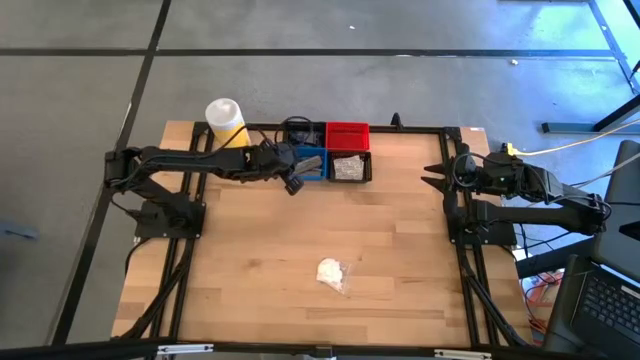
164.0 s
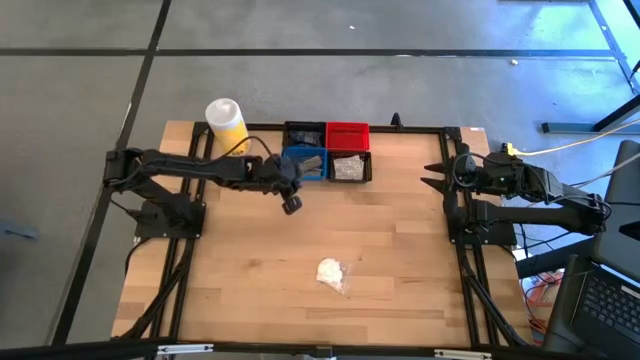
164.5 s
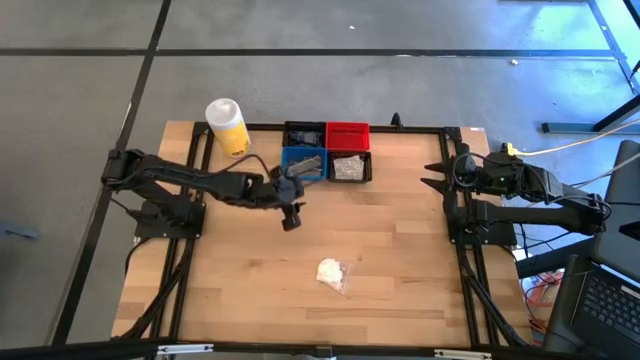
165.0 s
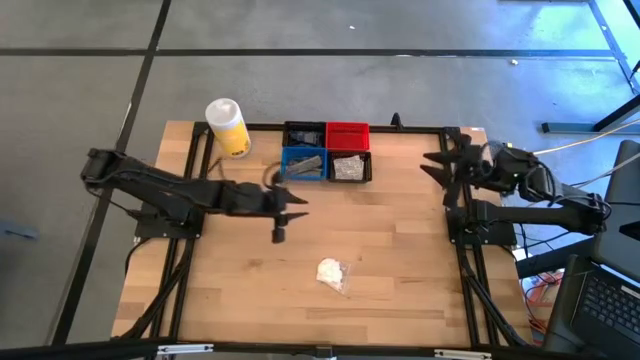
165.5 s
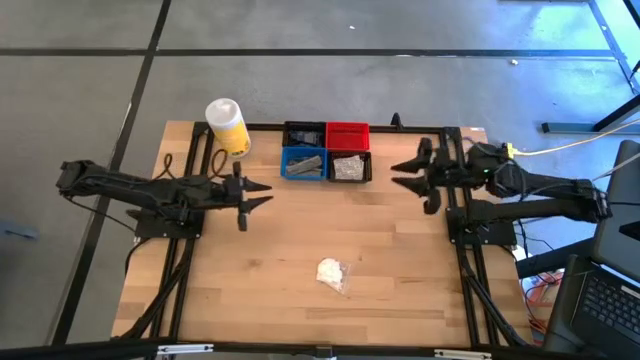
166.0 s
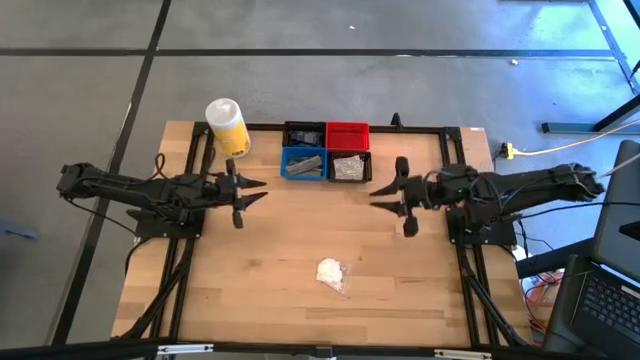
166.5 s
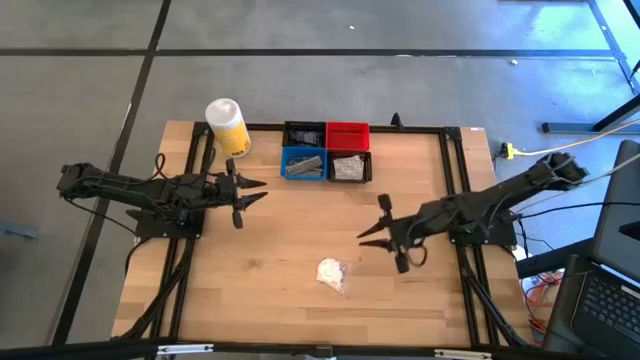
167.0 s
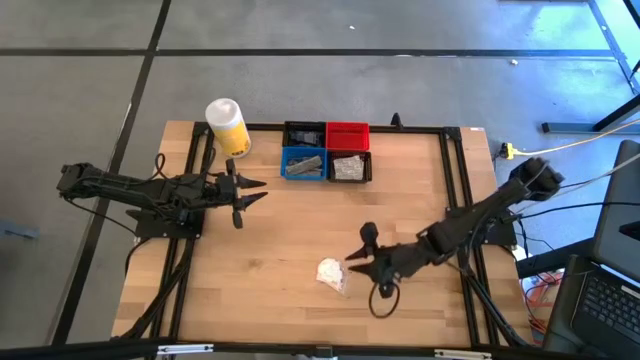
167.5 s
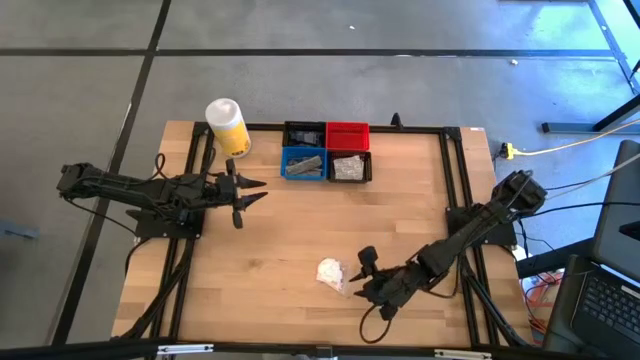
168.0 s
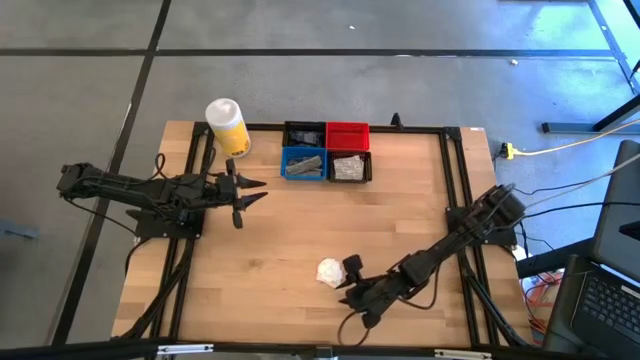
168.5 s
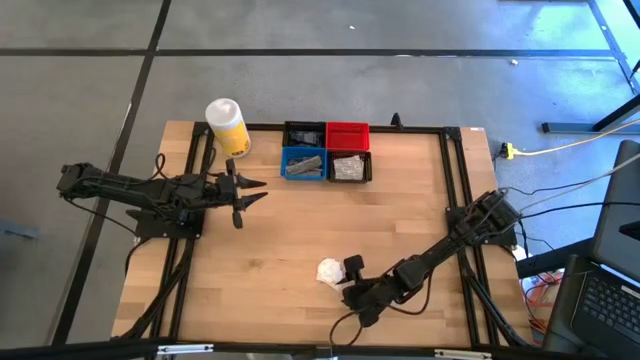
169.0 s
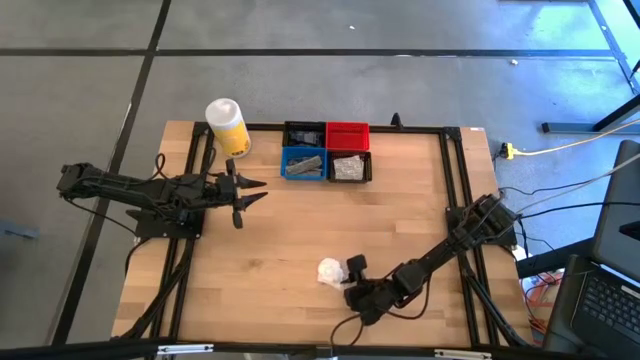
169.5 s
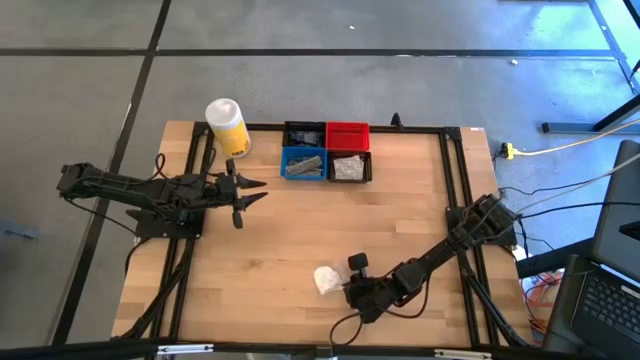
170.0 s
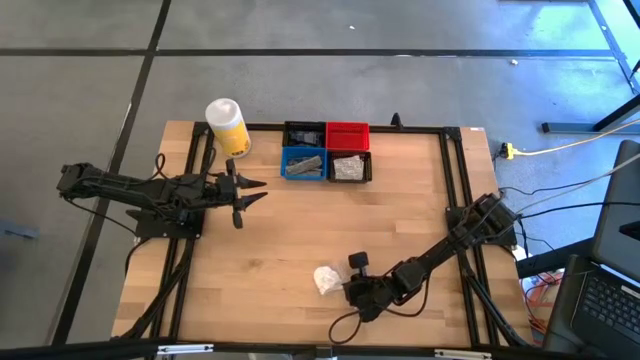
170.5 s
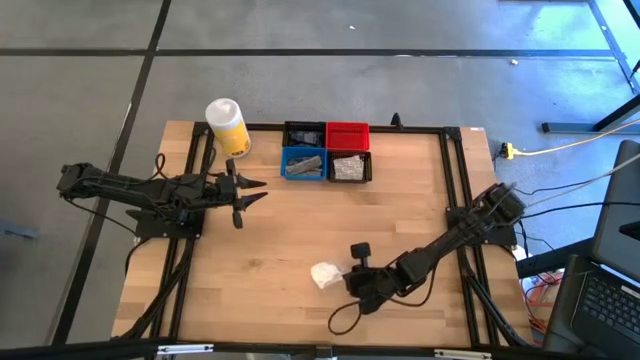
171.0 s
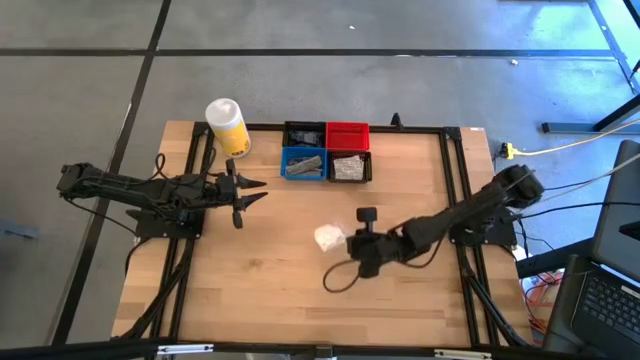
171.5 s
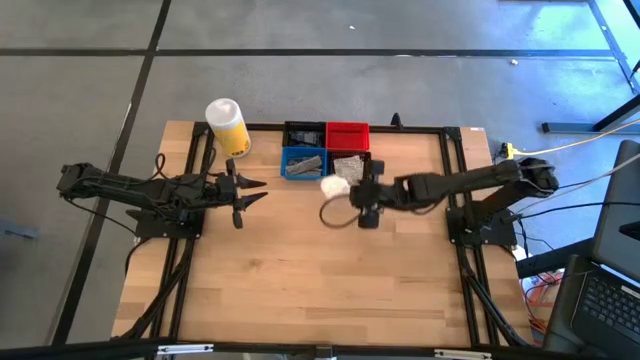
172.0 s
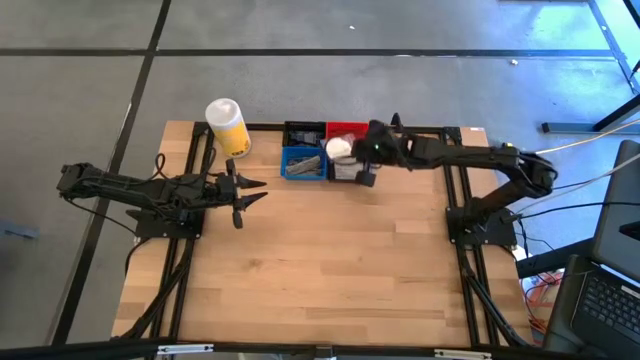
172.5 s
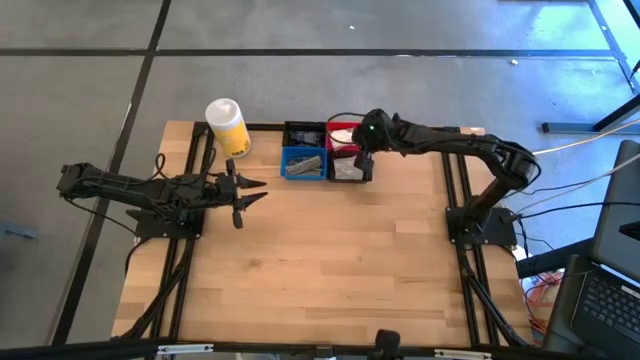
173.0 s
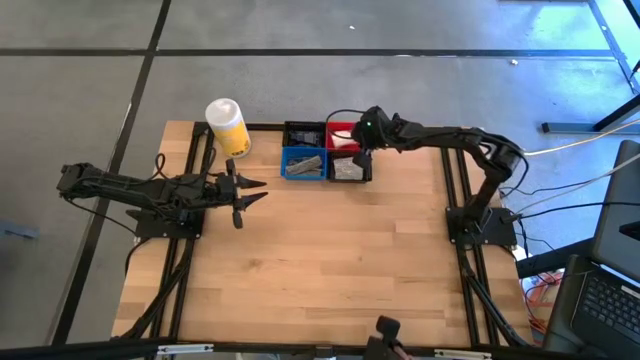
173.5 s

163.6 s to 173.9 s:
Task: Pick & Place Travel size toiletries
Put the cotton pack into the red bin

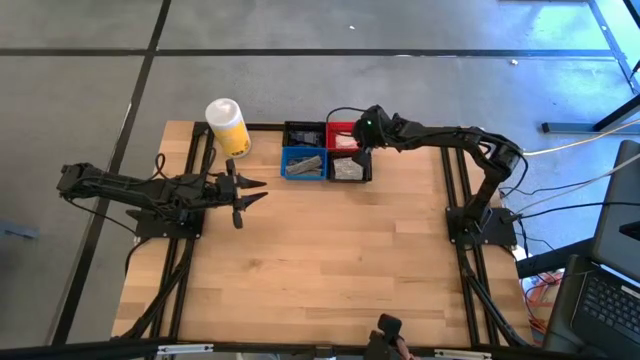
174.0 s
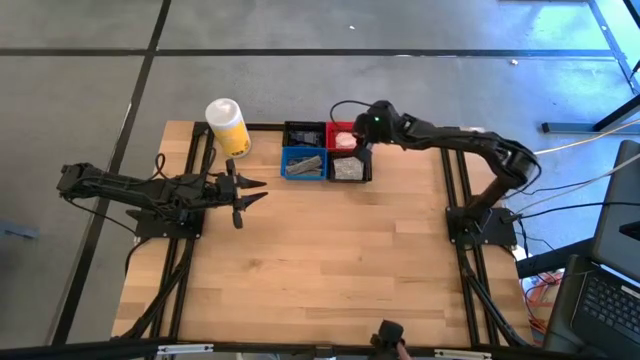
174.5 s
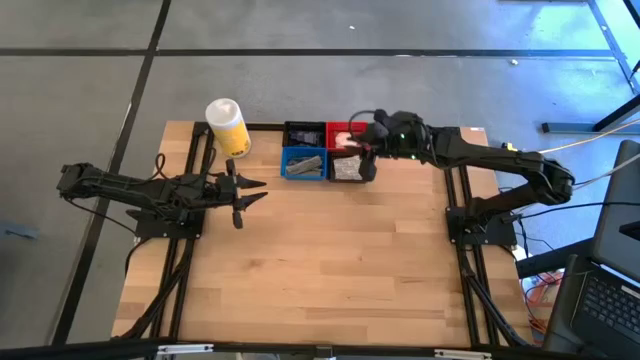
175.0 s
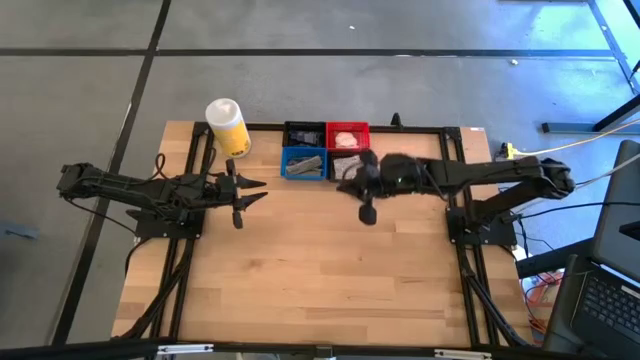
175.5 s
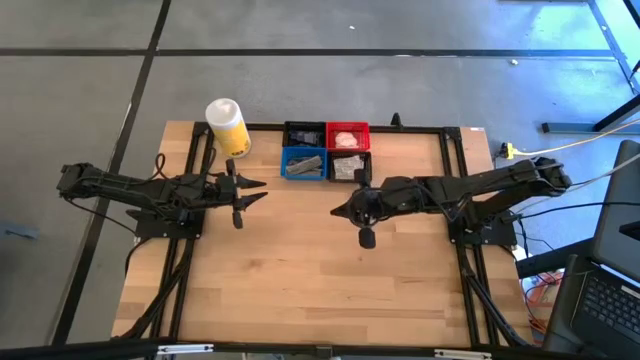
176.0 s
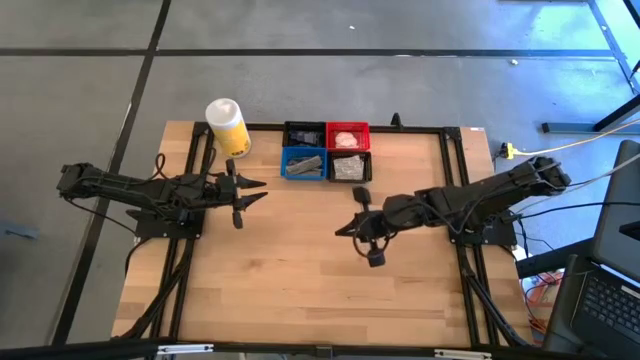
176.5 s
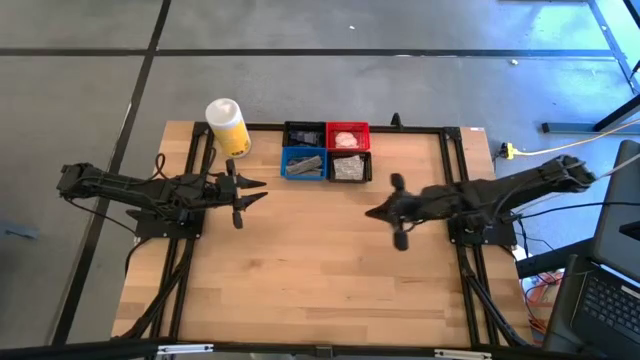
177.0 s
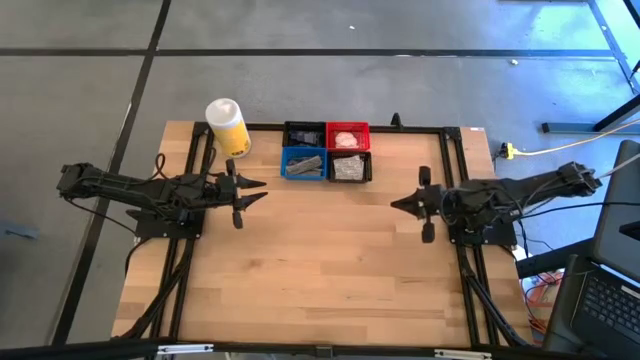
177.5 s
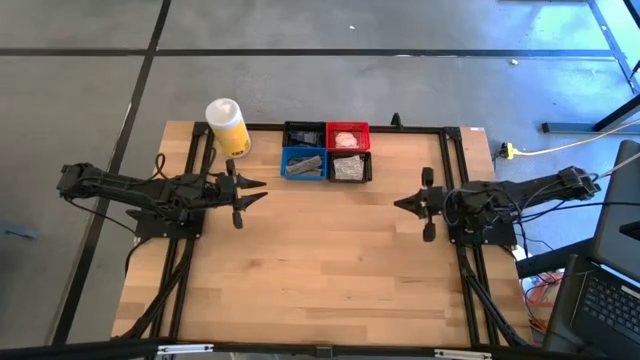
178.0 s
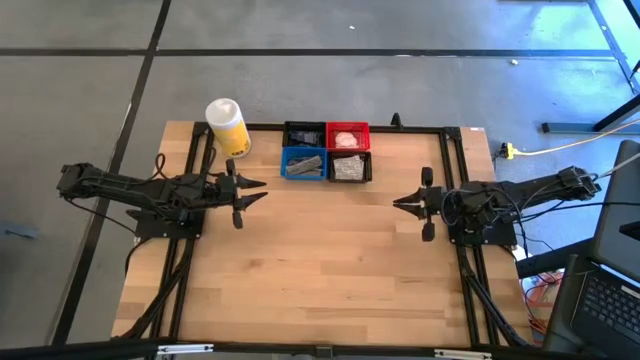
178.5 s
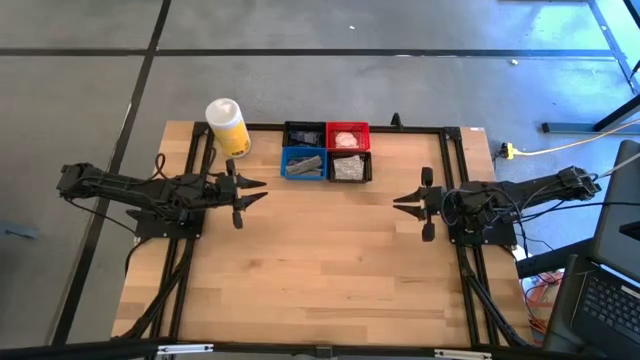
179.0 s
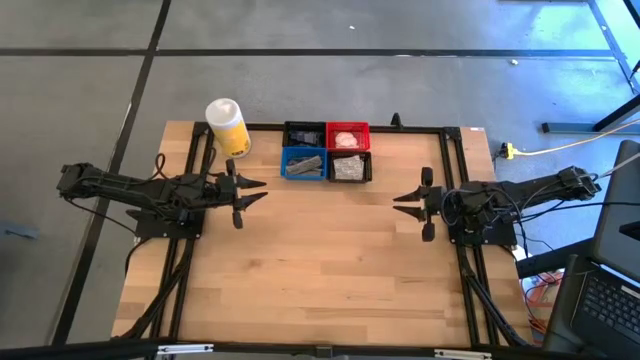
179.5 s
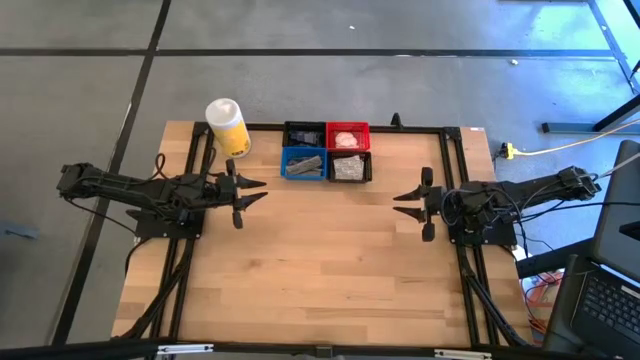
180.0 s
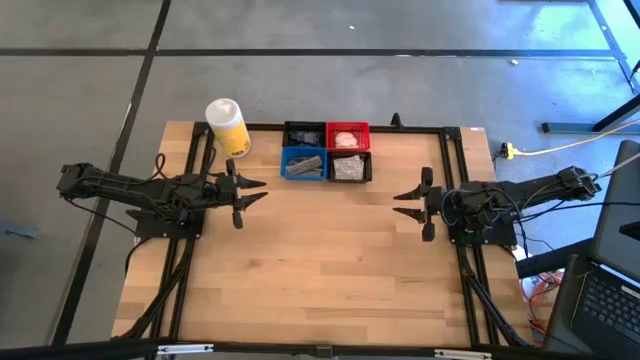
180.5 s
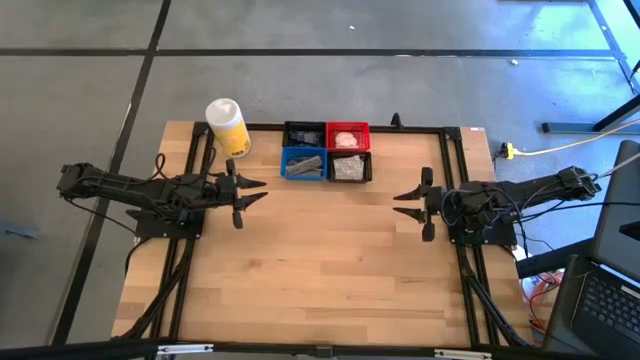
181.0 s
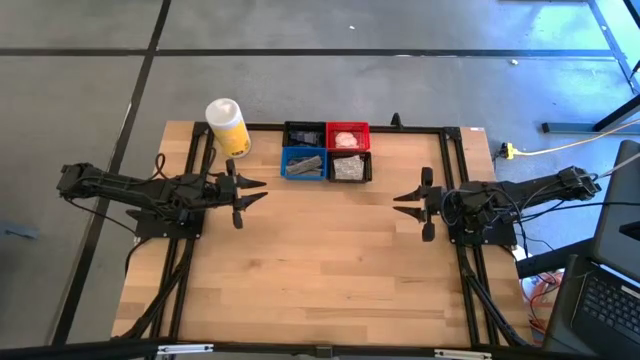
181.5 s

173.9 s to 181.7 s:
Return to Home Position

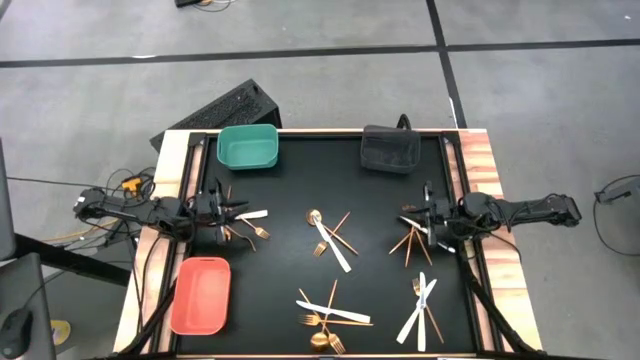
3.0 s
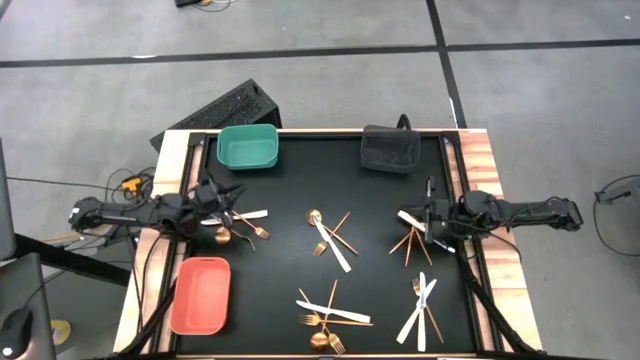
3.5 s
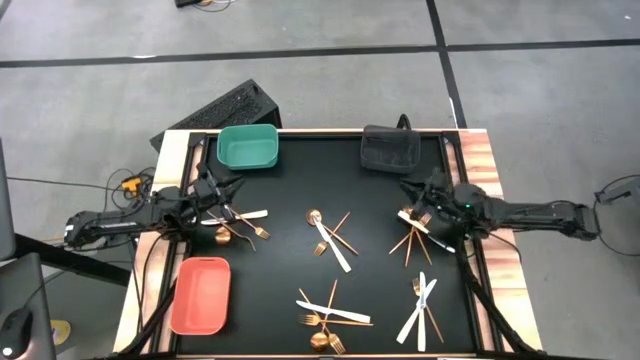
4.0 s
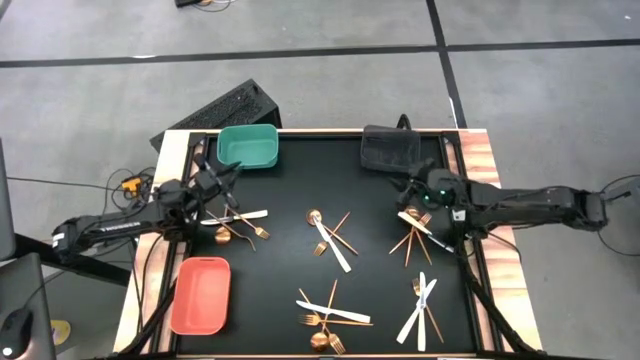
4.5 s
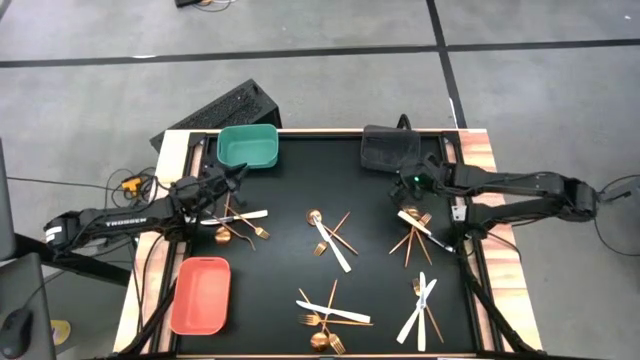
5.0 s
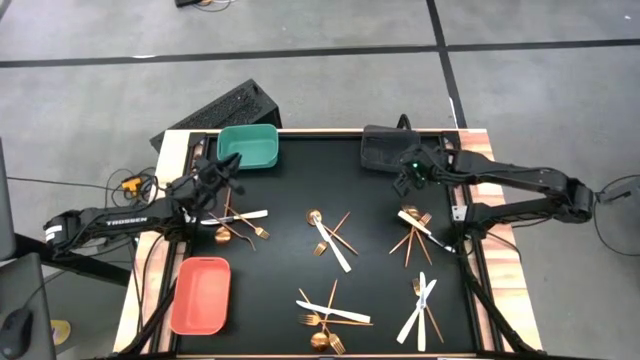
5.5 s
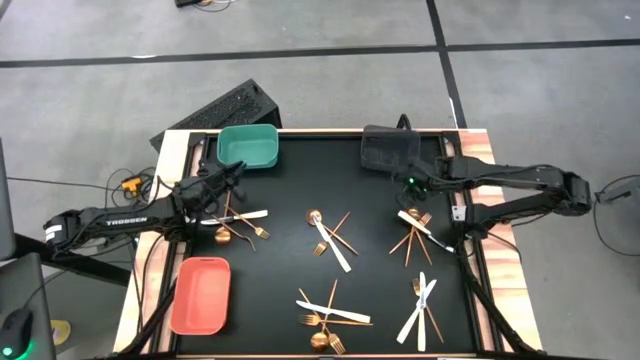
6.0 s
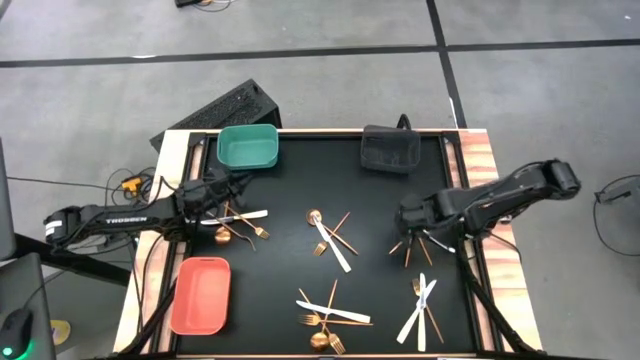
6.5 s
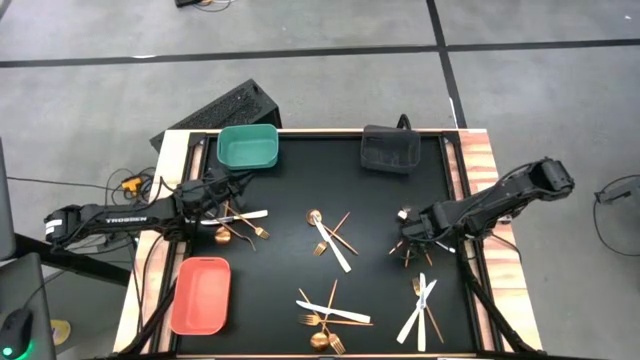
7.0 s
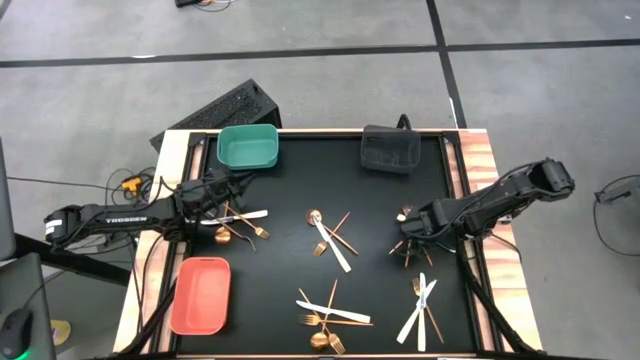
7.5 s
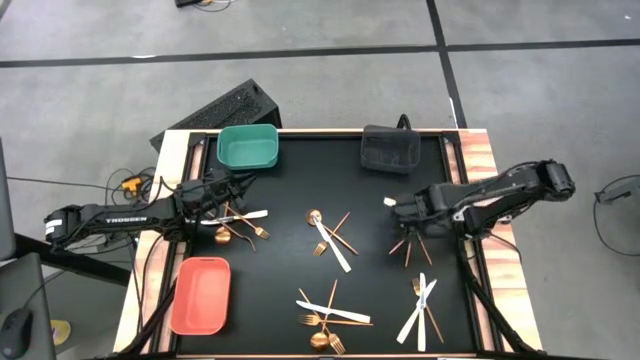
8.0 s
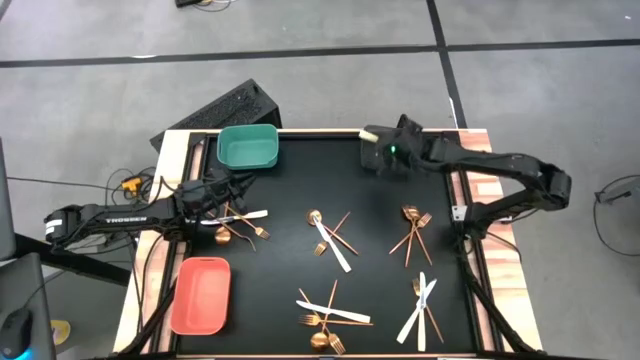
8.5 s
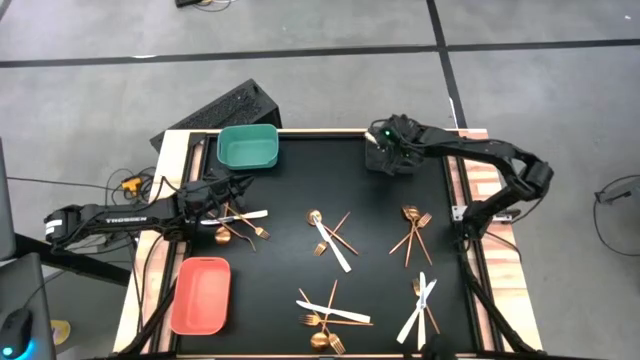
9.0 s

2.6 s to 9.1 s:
Task: Sort silverware by color (type)
Put the white knife into the black bin
